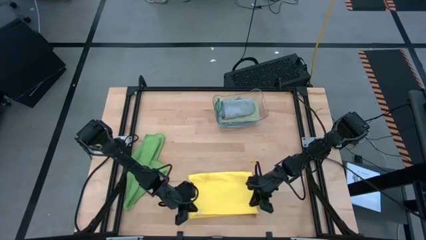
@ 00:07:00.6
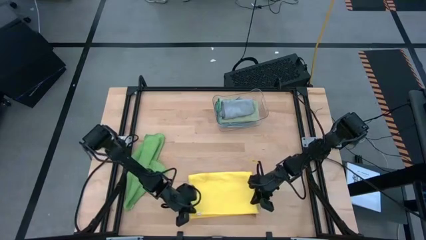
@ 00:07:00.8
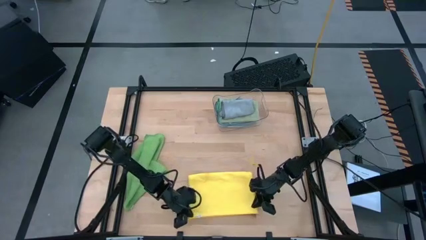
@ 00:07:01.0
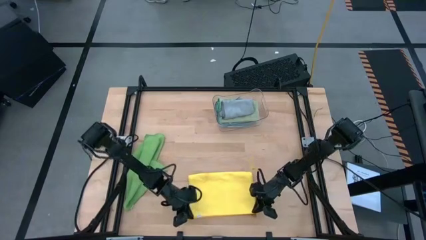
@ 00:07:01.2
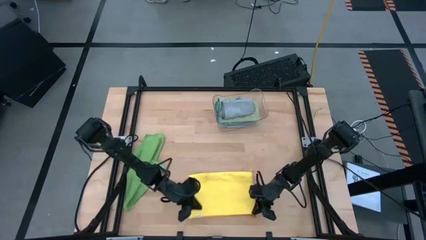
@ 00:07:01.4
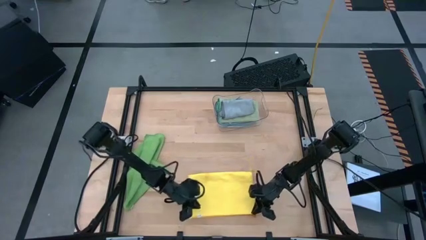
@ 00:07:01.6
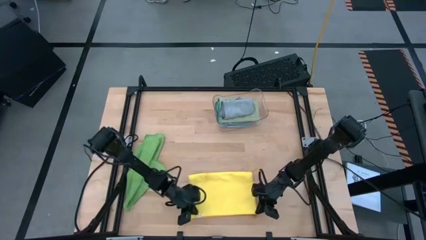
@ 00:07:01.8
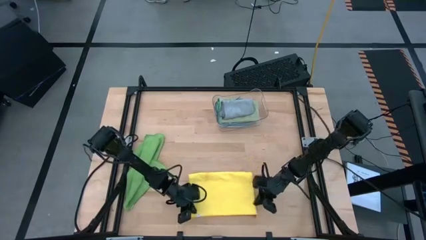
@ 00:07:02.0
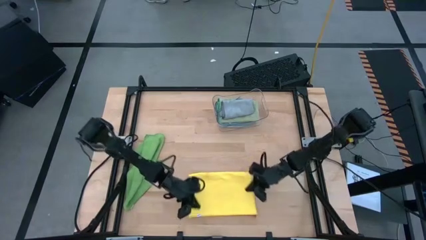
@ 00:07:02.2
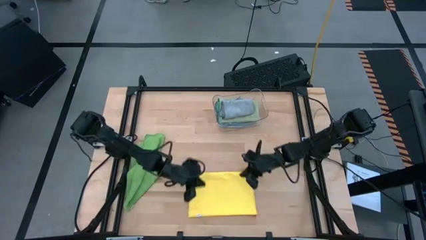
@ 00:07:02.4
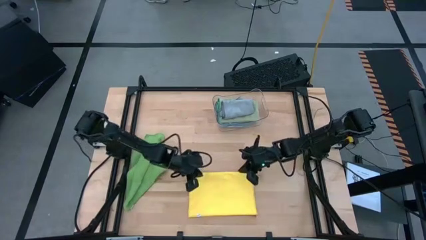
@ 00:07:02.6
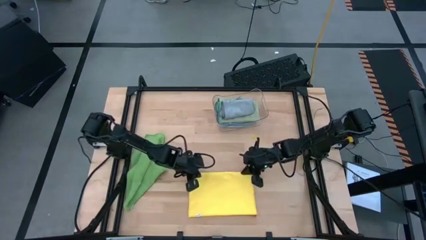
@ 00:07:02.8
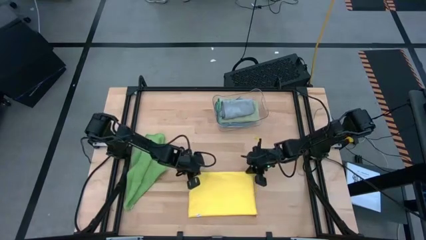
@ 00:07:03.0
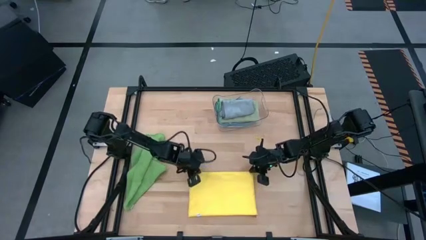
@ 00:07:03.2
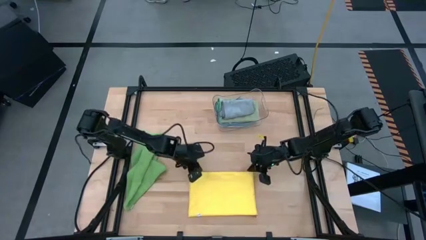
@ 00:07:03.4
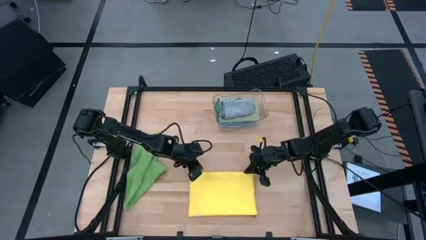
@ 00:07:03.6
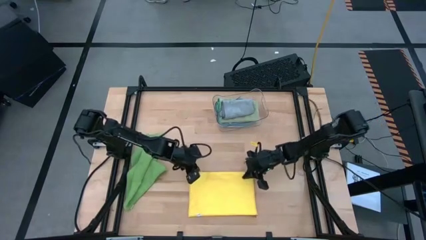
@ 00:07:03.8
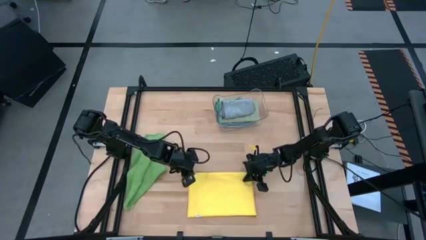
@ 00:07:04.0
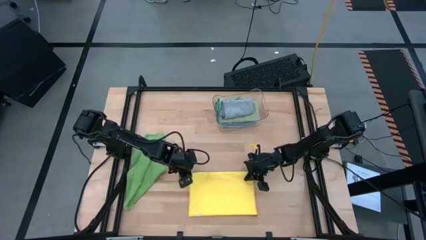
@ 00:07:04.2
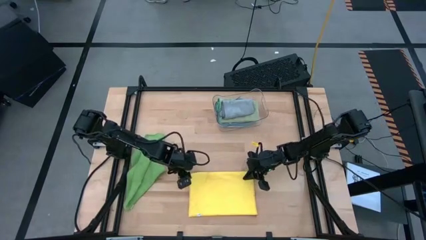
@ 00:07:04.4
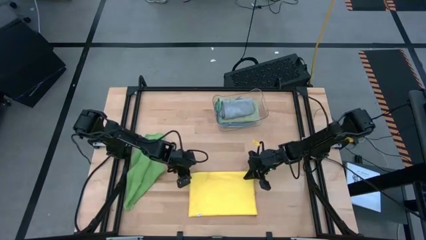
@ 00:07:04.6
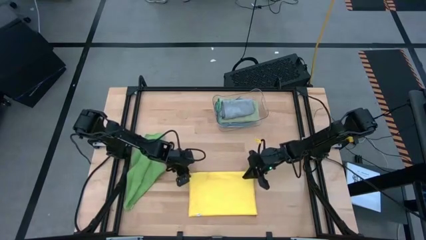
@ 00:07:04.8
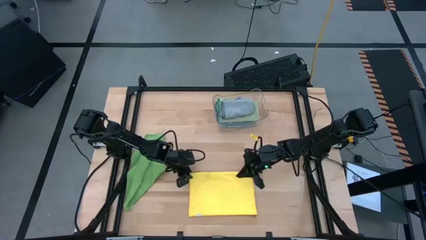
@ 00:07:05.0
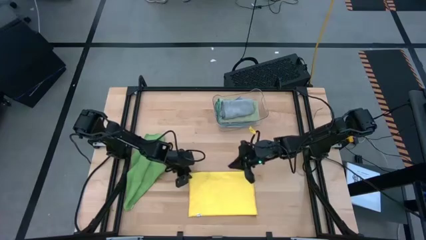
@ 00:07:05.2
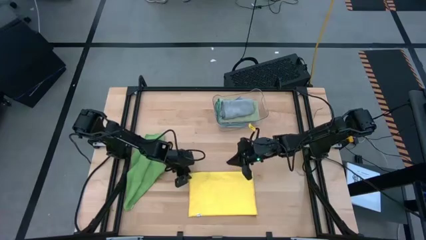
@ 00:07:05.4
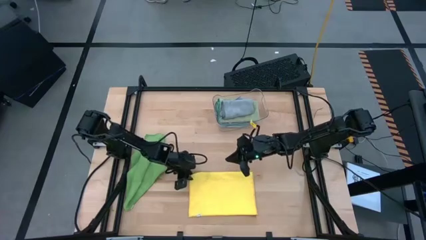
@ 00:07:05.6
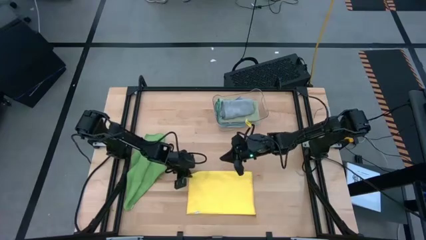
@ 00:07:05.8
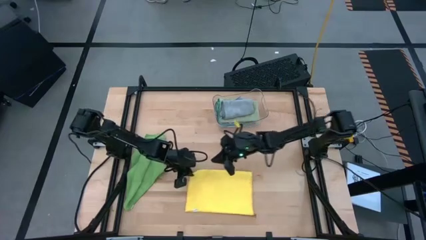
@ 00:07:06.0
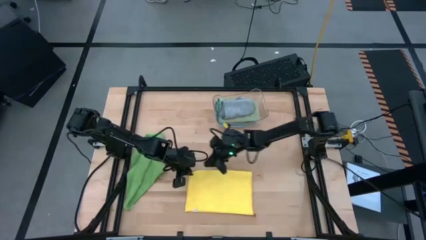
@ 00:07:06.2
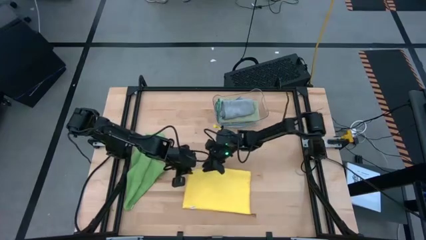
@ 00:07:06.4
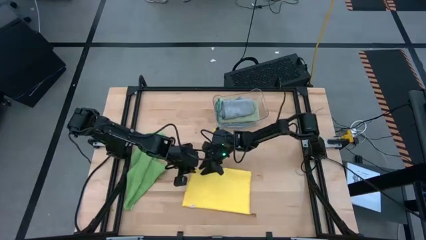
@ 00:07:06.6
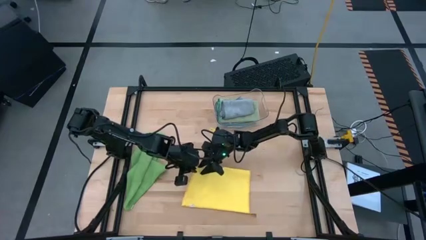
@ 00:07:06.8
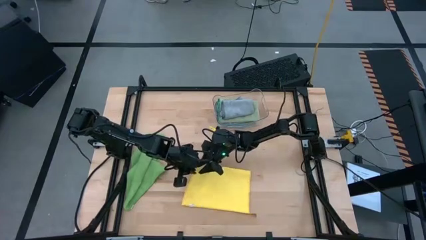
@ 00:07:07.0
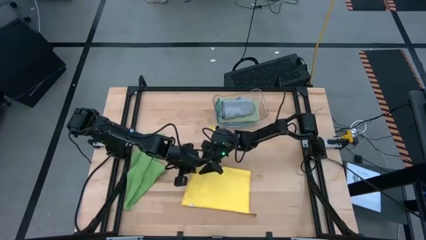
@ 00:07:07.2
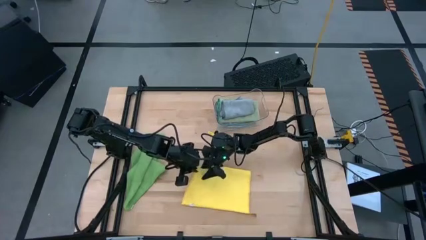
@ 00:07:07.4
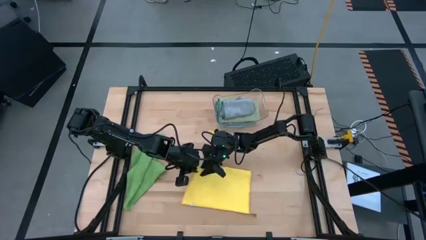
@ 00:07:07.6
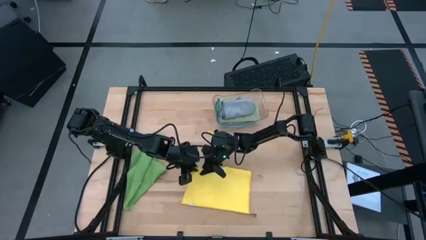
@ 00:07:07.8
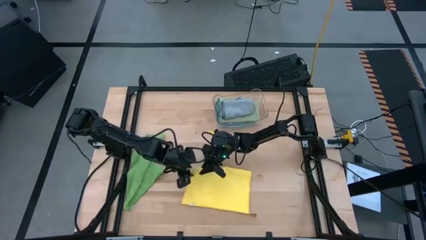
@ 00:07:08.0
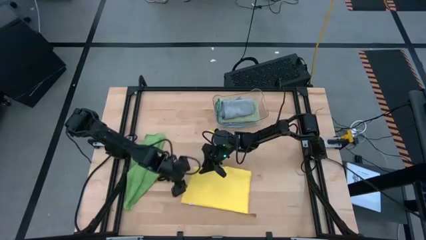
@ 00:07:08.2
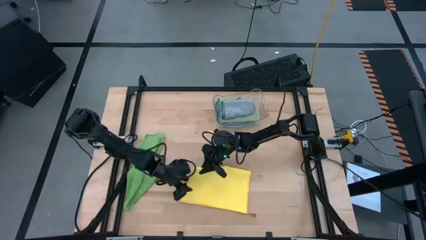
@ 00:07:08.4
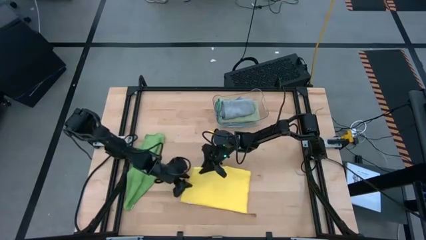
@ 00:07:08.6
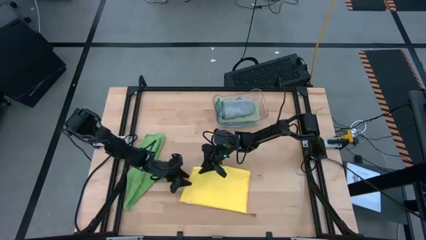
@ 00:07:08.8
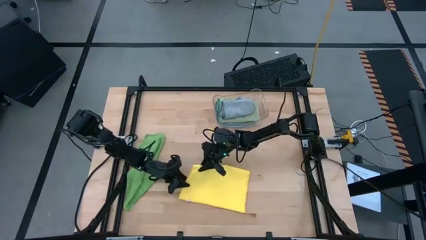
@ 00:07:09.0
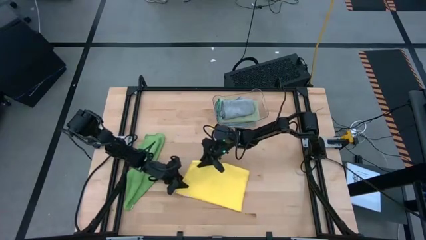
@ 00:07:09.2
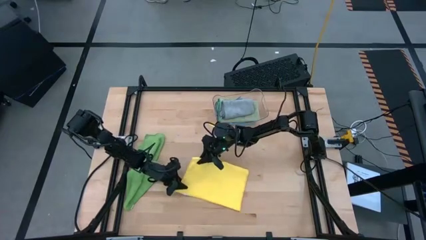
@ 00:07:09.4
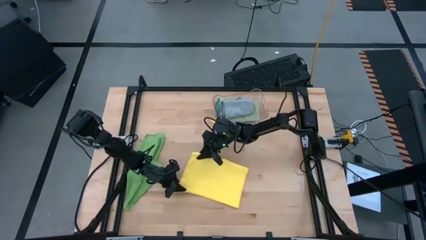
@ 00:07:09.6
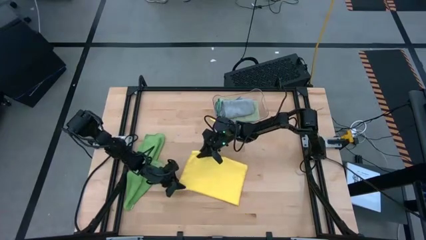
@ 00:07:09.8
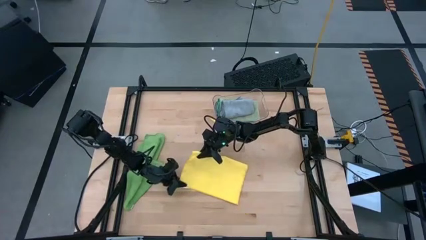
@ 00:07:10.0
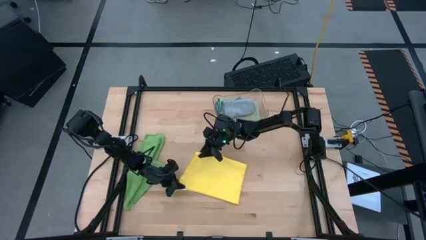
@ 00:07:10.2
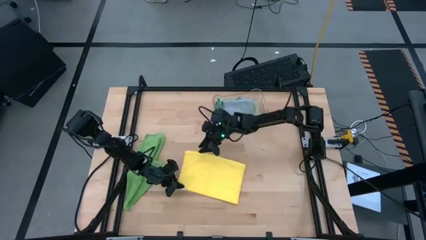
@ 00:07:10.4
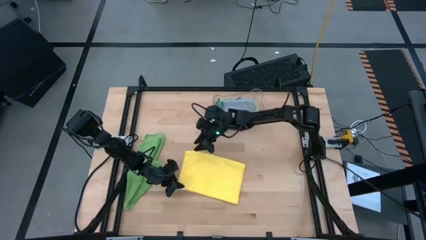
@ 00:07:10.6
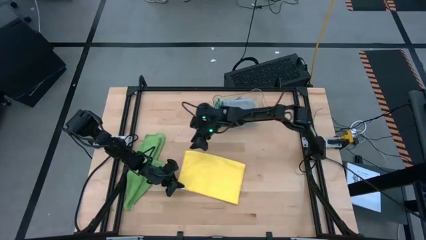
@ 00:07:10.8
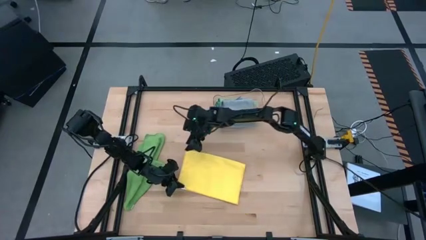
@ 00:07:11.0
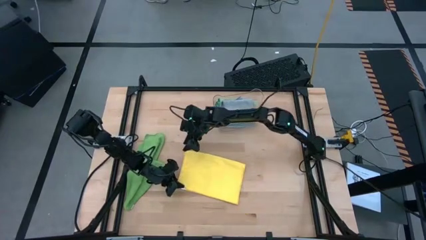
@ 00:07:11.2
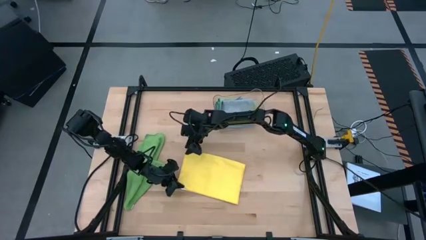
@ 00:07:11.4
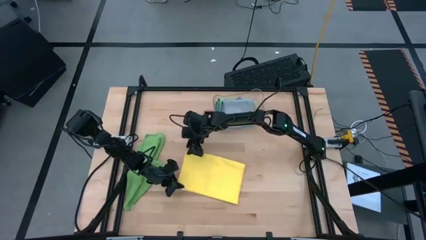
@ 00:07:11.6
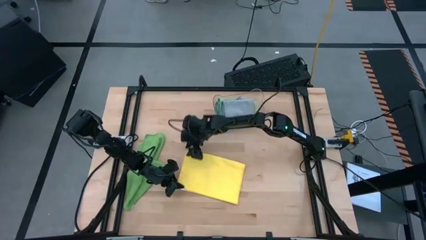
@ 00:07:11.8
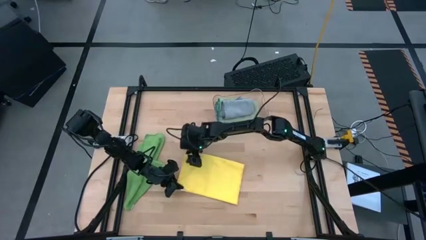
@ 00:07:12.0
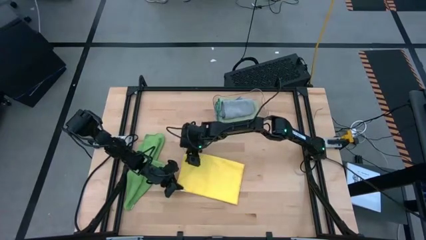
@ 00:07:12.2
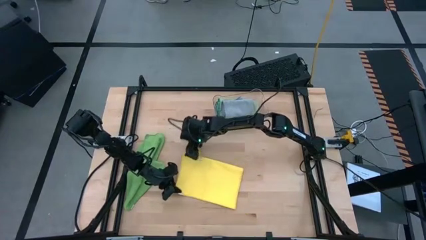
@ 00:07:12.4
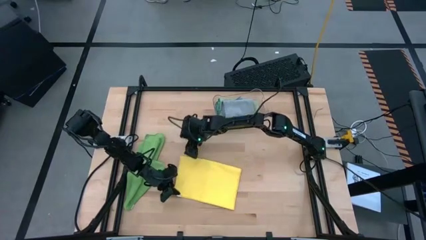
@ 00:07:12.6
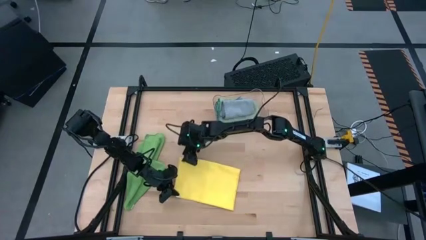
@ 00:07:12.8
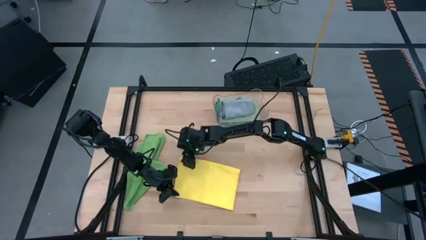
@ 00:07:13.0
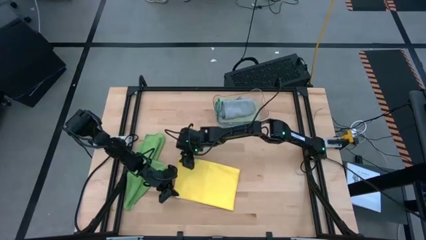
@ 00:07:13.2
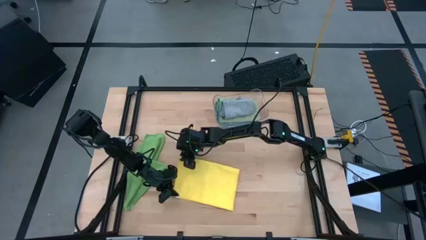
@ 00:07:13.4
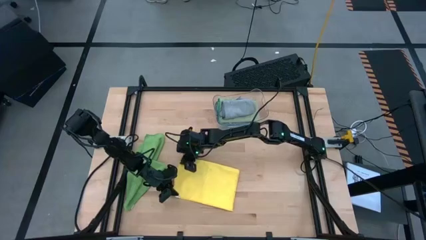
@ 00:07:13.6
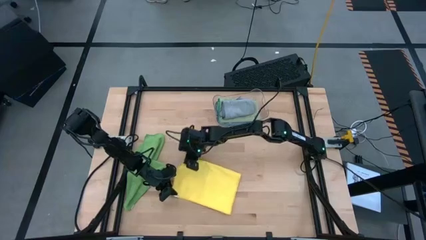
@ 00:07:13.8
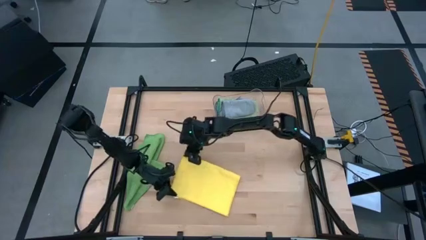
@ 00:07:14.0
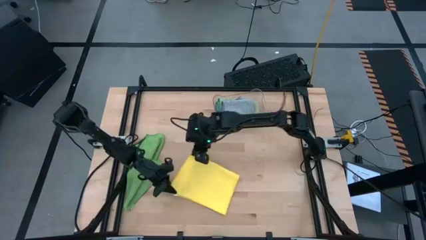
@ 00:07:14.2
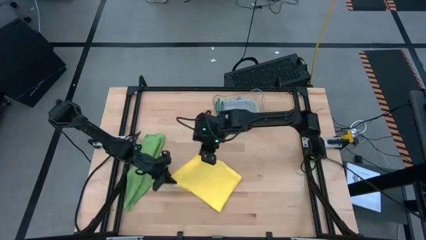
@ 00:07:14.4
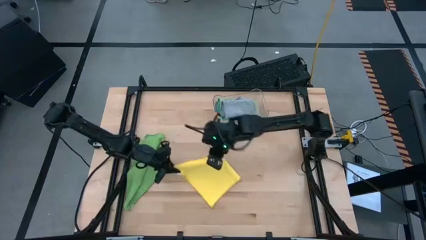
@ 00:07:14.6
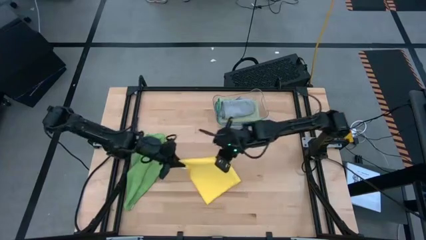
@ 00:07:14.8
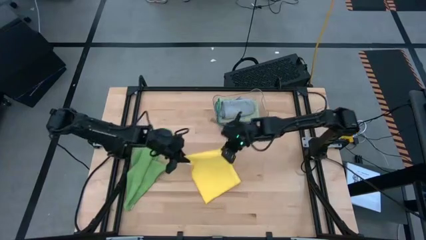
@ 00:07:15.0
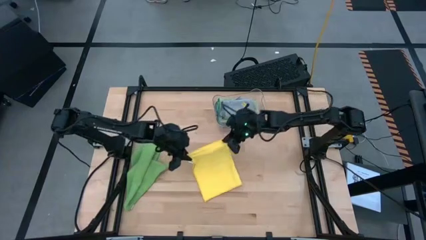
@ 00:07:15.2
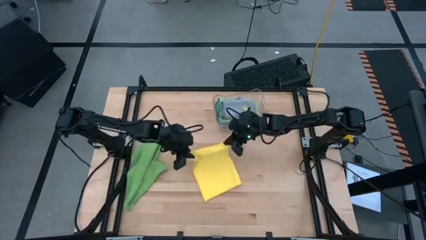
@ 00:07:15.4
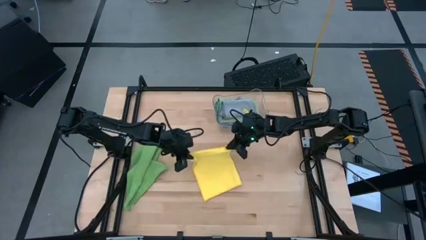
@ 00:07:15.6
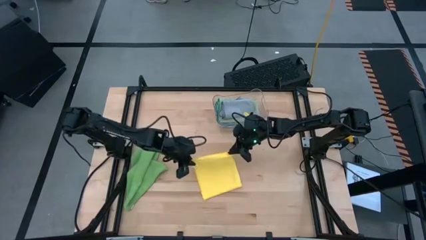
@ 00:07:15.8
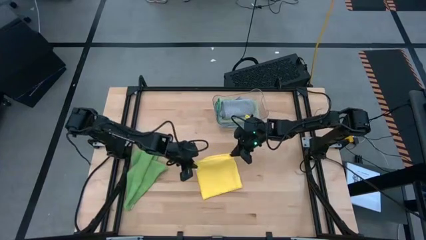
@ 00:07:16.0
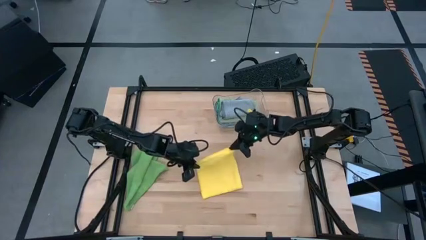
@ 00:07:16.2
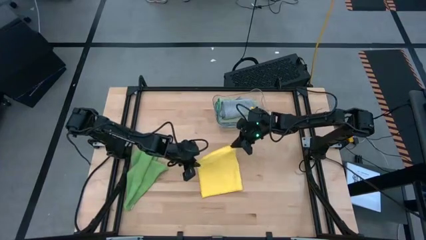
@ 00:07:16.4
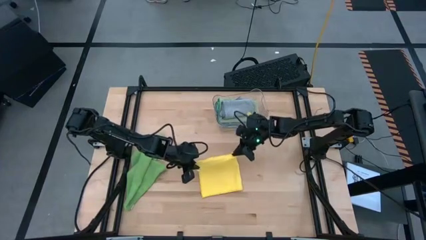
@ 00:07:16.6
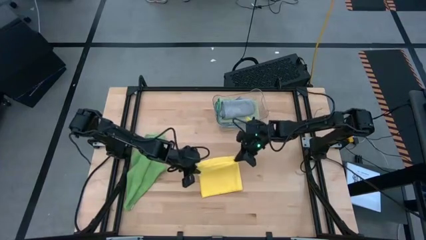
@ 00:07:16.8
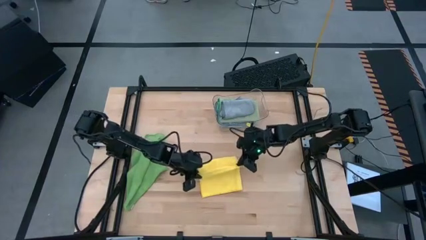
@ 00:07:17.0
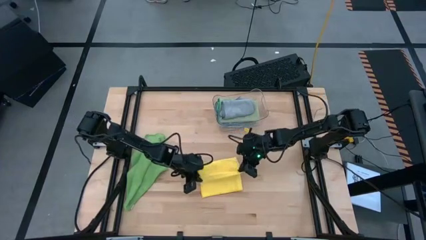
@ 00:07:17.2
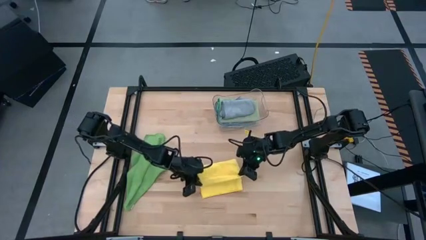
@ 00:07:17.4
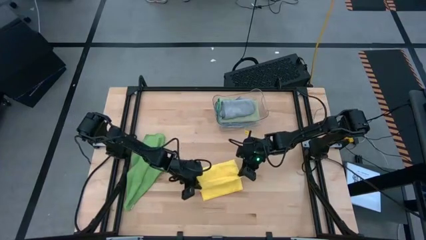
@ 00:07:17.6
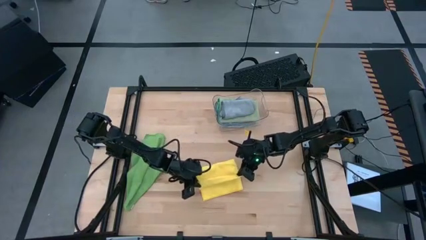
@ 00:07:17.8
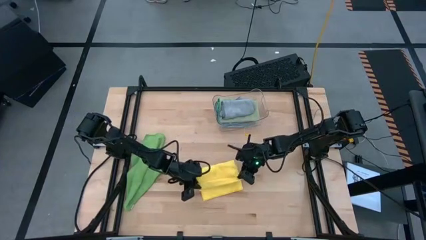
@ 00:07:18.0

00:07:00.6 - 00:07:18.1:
Task: Fold microfiber towels
Fold the yellow towel
